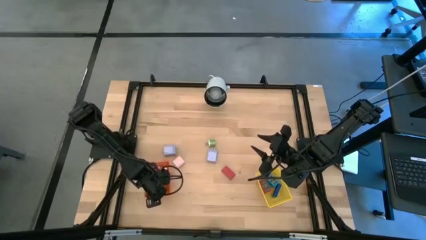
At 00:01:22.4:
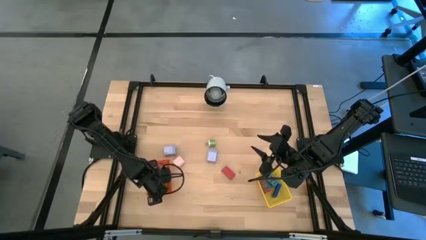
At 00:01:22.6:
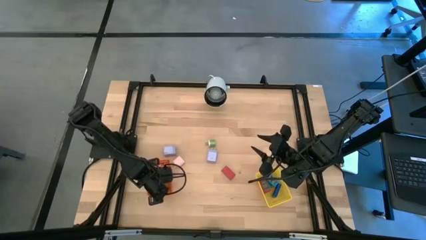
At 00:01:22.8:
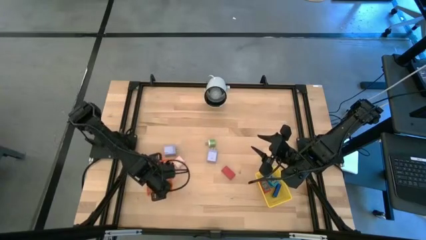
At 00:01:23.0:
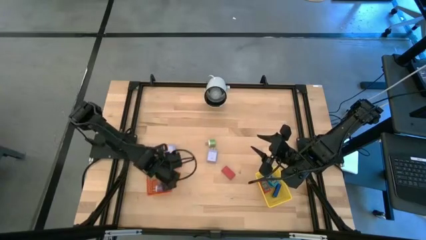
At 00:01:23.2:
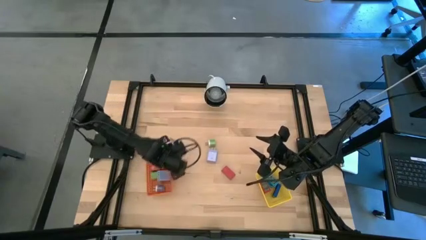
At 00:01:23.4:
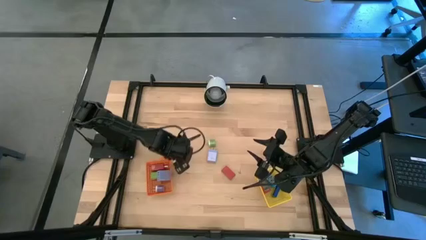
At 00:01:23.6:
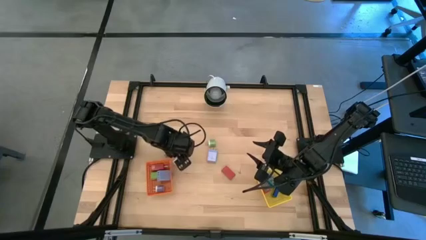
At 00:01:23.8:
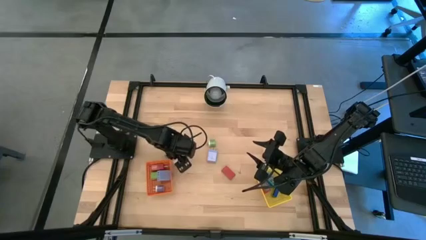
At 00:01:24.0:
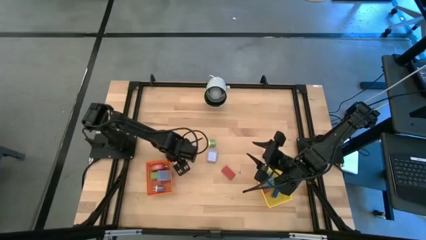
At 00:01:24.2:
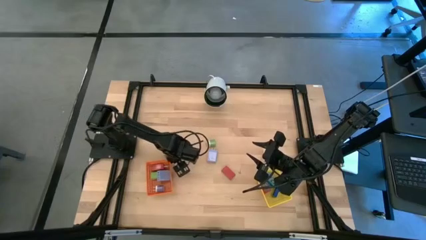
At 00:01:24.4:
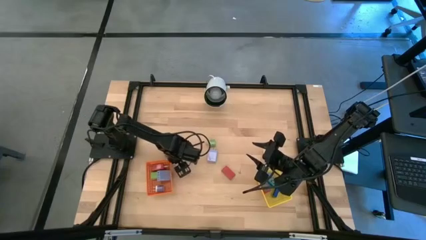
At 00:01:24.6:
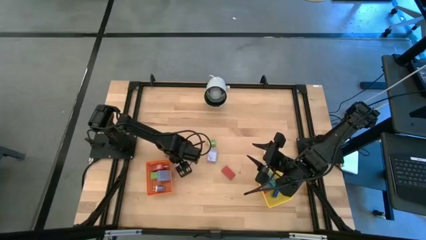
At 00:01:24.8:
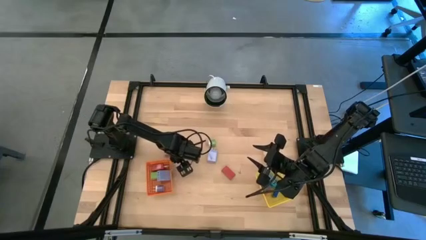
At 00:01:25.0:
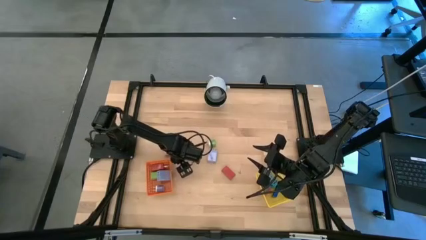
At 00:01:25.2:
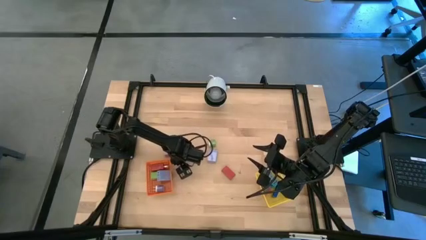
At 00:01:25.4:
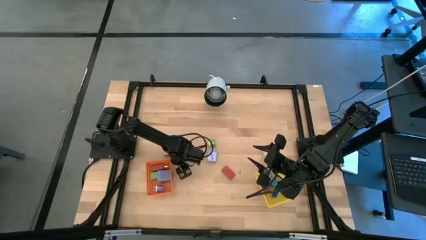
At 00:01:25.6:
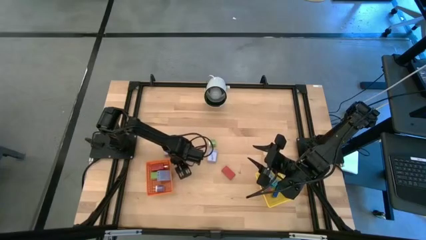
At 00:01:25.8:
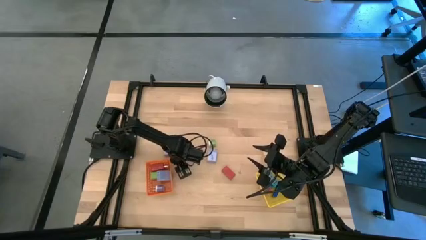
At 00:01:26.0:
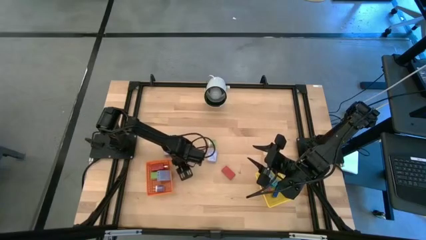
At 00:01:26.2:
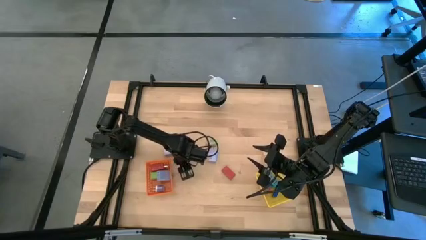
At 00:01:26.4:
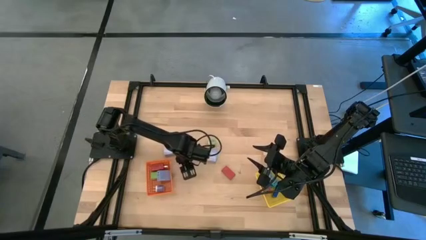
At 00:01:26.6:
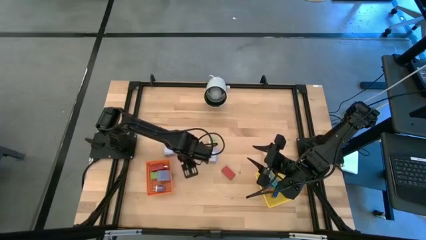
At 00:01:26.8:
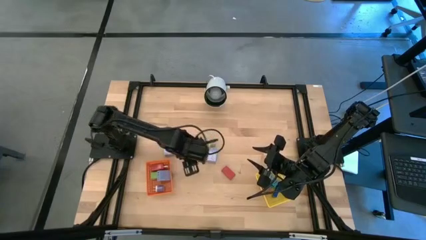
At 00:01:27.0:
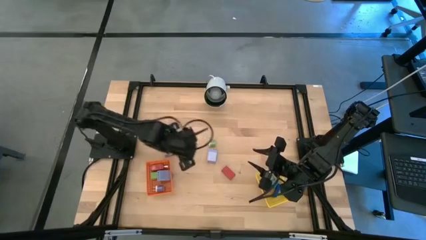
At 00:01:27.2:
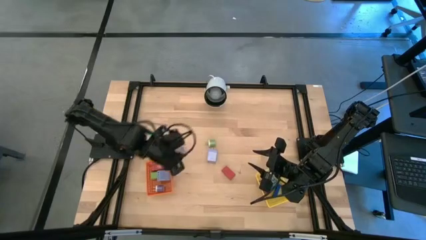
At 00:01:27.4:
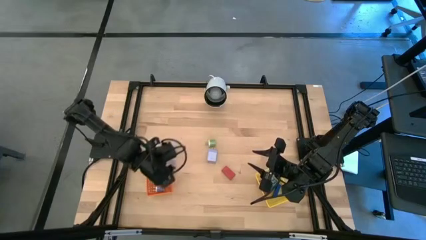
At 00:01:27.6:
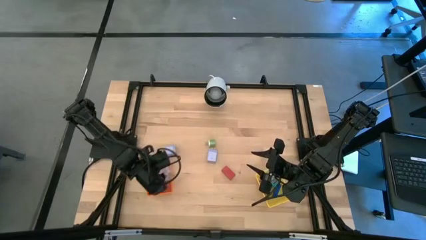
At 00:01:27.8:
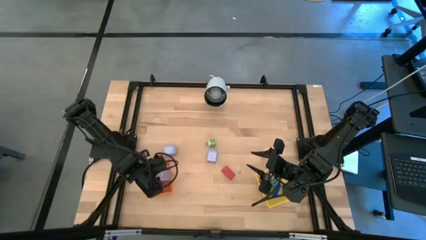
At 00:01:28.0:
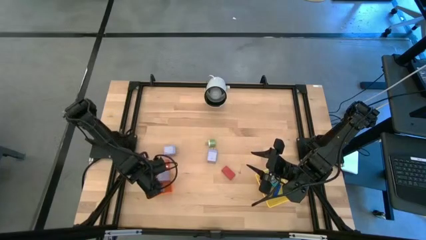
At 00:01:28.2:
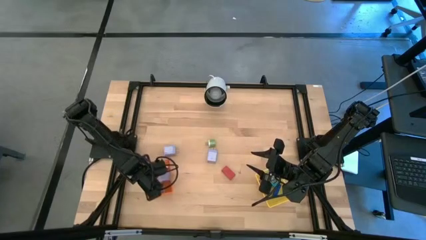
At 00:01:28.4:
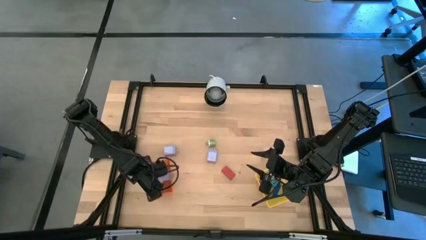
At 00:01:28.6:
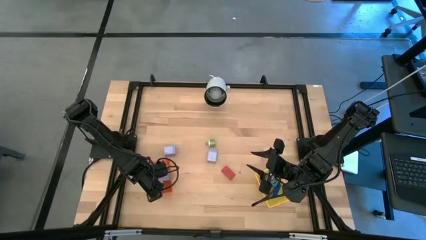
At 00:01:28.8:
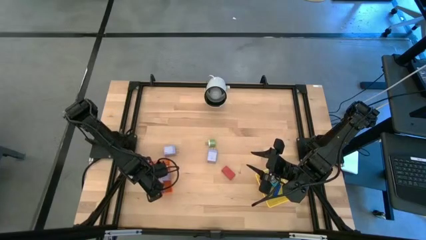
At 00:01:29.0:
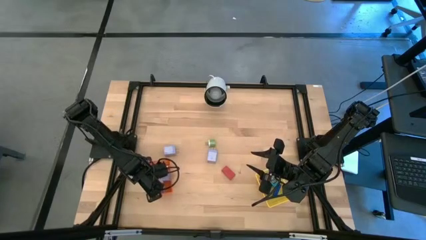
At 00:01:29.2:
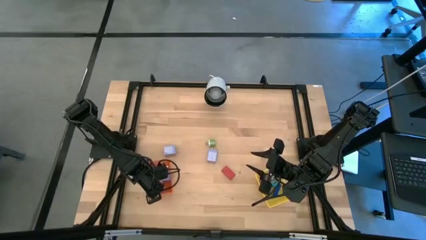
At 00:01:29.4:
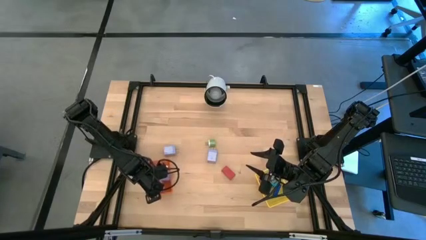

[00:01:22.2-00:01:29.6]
Task: Pick & Place Office items
Put the white charger adapter into the orange basket

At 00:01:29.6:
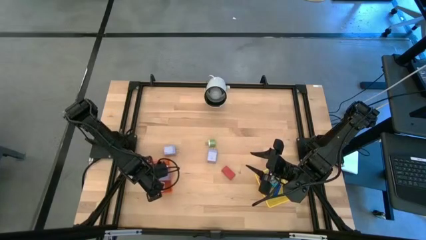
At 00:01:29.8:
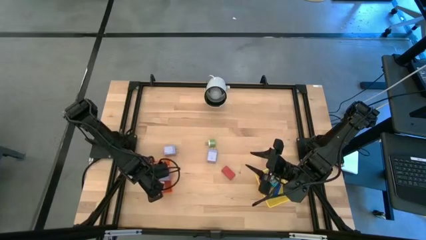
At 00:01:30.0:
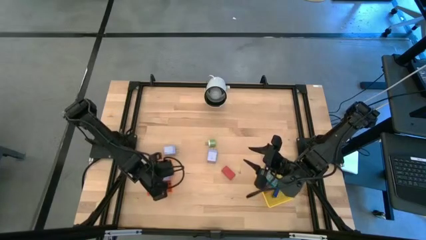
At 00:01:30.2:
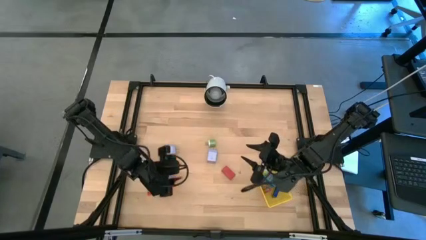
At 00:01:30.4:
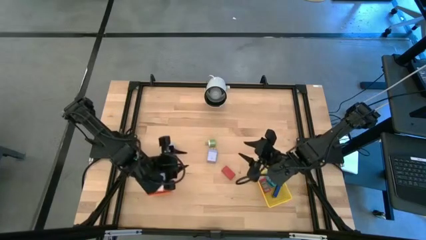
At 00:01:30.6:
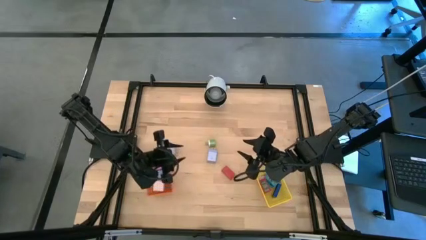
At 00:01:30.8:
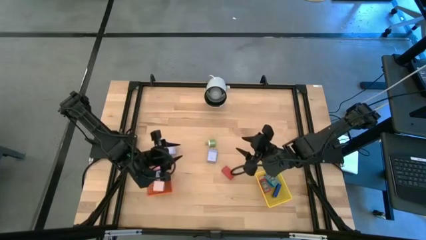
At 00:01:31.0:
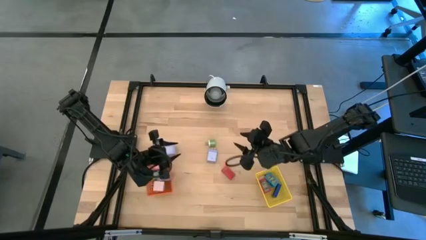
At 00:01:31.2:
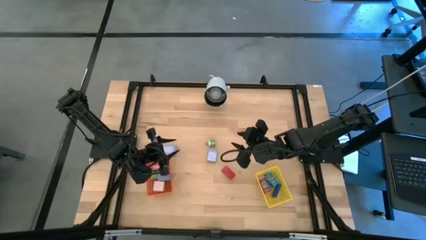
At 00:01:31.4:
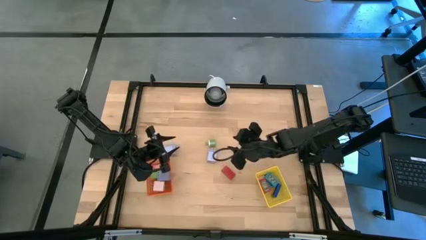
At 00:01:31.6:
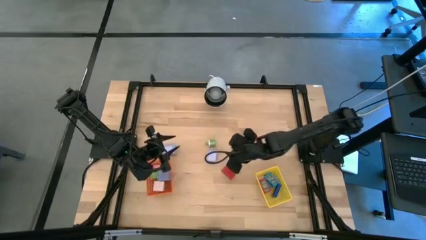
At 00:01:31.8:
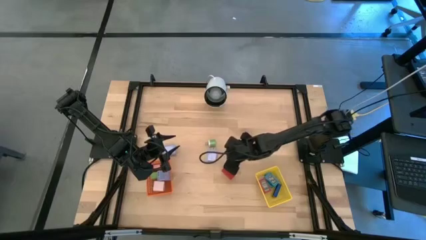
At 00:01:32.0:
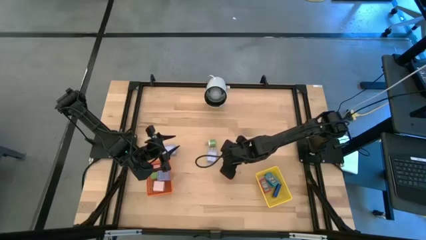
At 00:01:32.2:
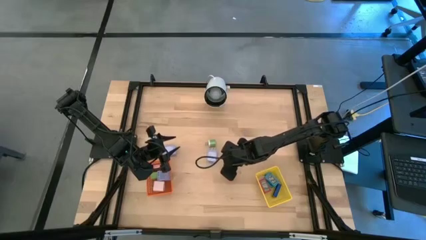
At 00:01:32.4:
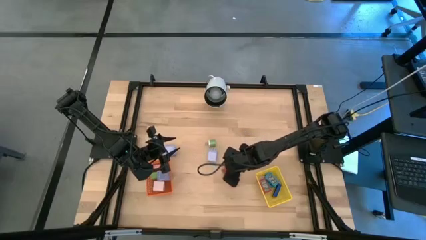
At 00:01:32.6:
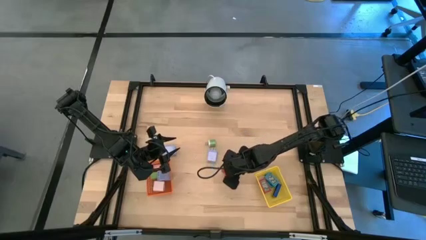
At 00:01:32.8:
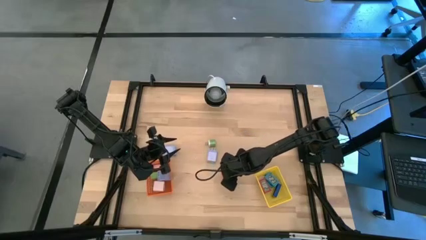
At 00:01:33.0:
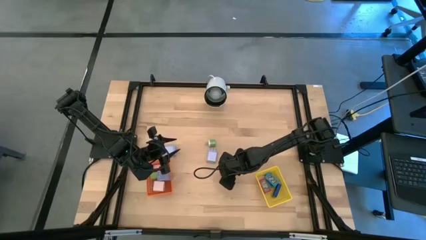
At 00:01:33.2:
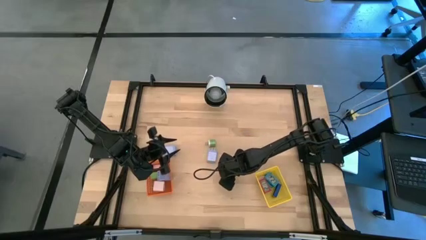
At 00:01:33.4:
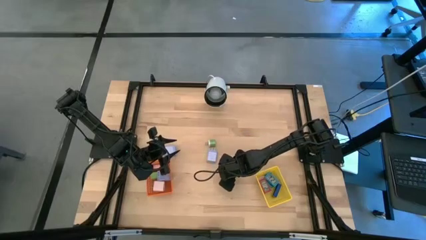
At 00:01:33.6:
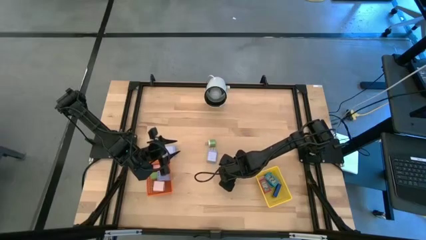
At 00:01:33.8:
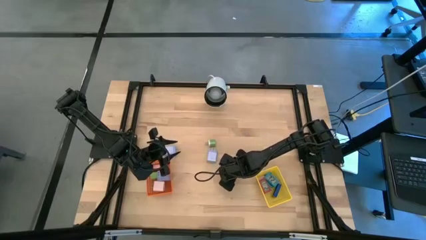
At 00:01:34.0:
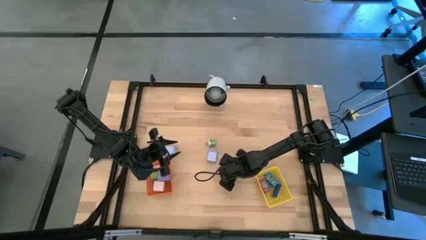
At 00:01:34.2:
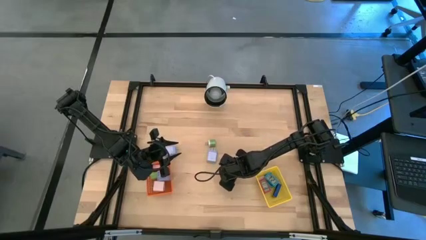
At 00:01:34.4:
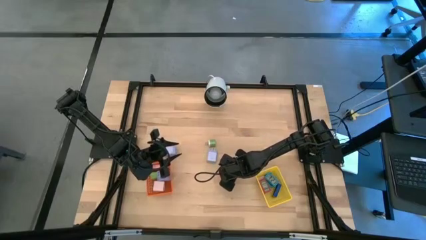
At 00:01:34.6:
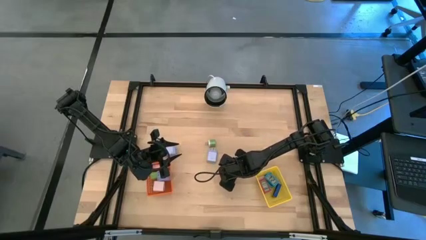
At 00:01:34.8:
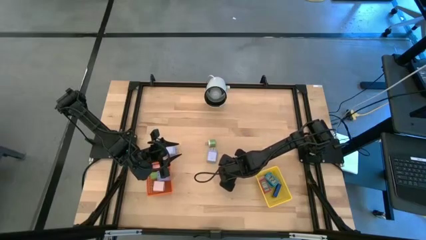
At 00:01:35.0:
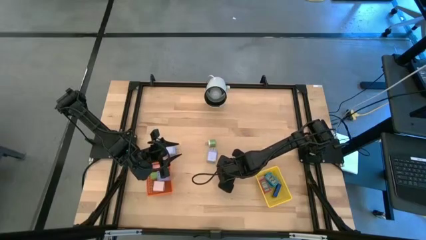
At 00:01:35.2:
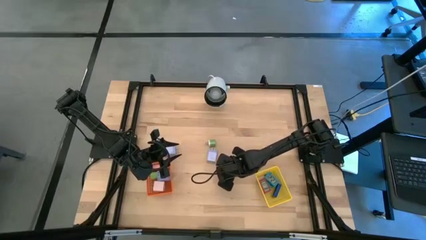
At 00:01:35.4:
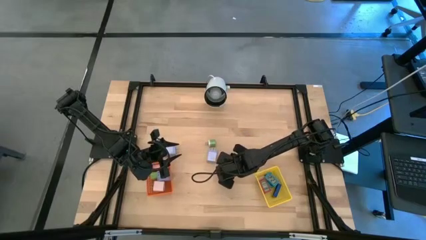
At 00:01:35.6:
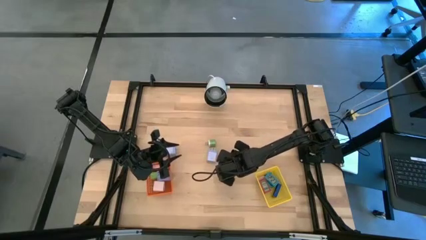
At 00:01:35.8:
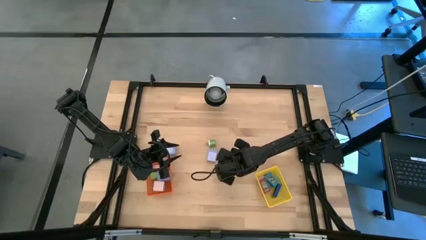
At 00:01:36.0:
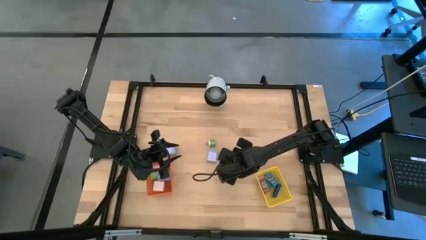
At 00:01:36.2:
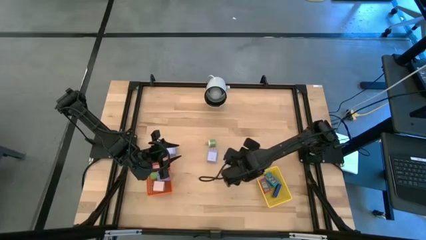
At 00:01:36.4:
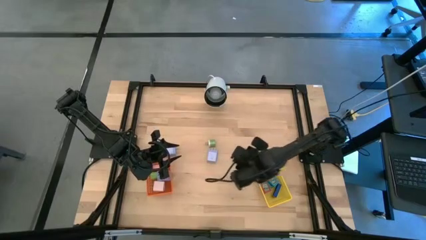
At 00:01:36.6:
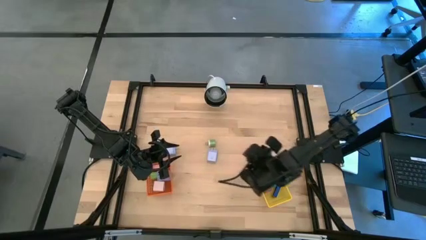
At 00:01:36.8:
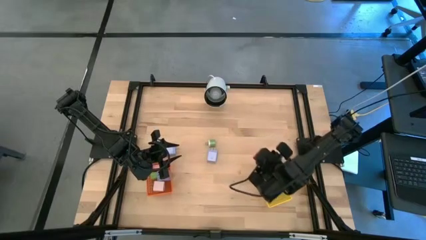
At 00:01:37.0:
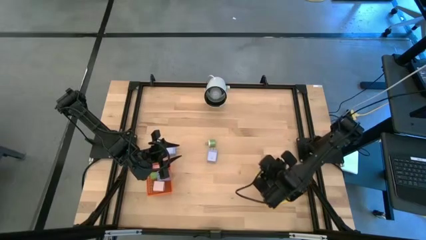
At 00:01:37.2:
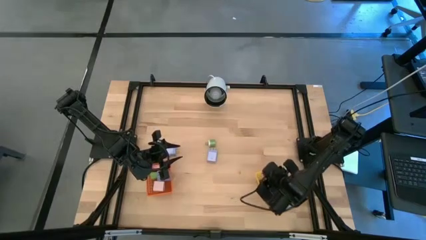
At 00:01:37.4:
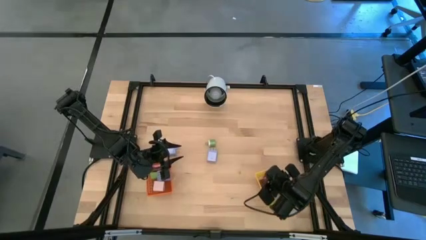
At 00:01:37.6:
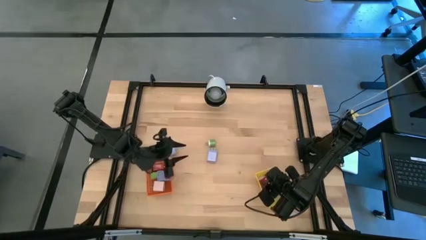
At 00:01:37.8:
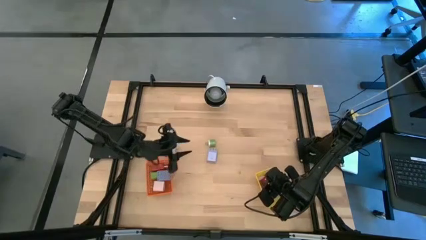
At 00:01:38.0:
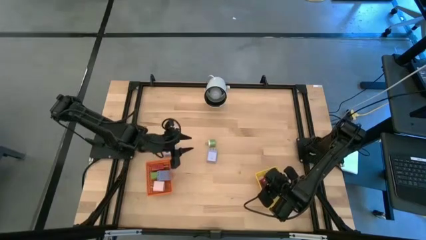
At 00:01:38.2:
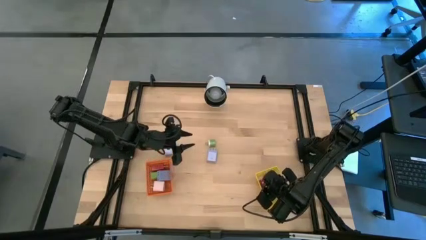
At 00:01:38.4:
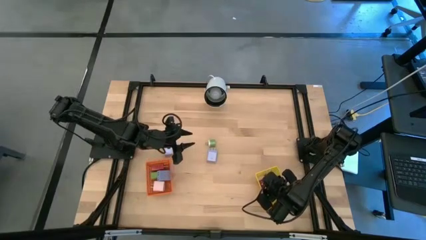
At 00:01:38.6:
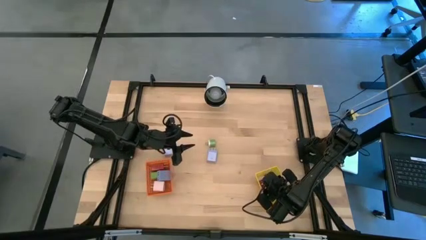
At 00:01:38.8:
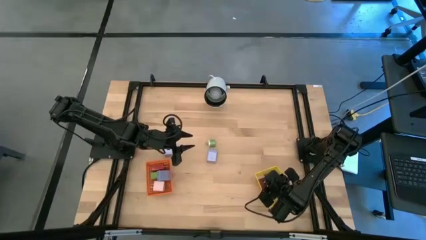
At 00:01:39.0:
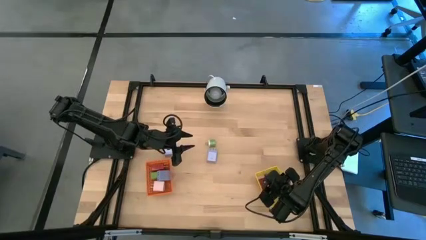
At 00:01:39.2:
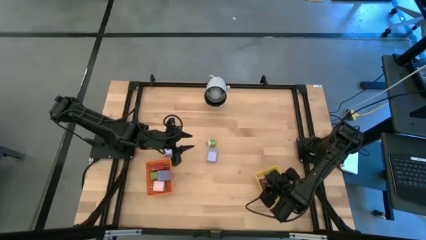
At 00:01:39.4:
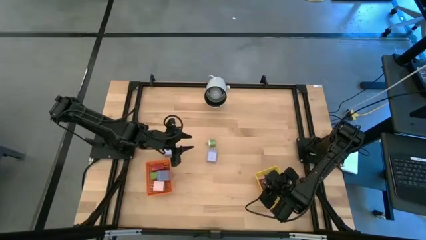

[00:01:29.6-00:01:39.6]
Put the red digital clock into the yellow basket
